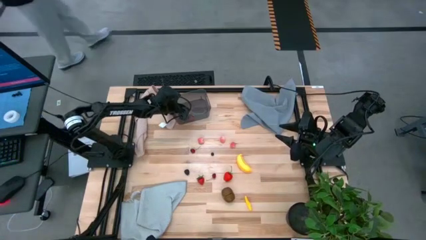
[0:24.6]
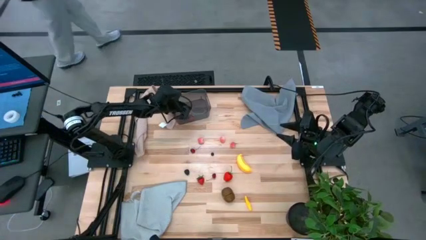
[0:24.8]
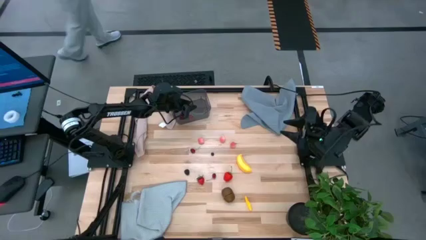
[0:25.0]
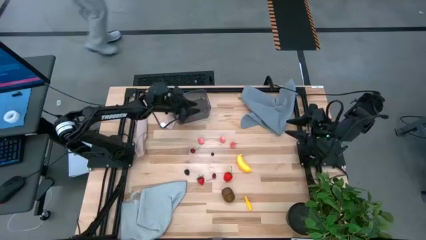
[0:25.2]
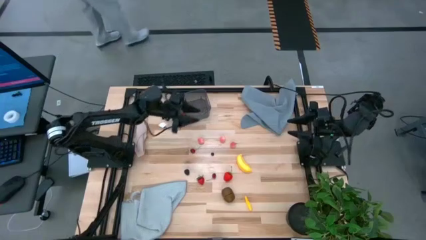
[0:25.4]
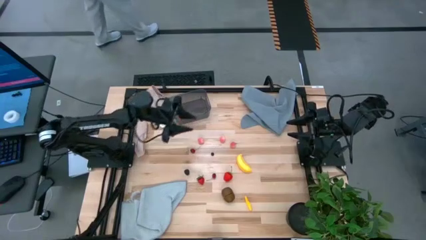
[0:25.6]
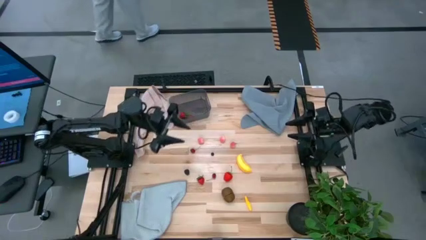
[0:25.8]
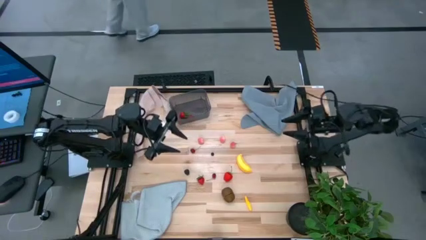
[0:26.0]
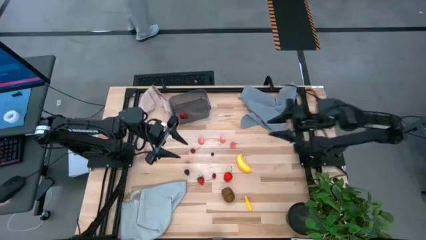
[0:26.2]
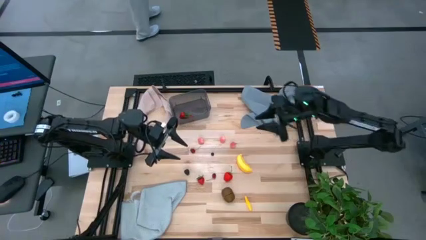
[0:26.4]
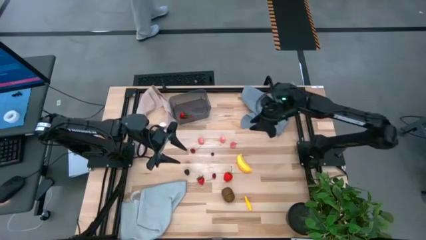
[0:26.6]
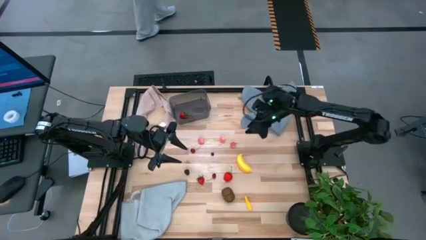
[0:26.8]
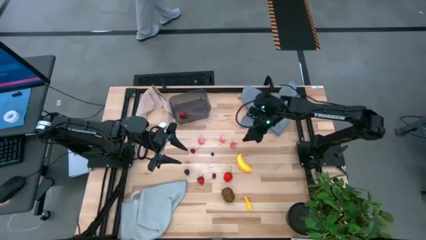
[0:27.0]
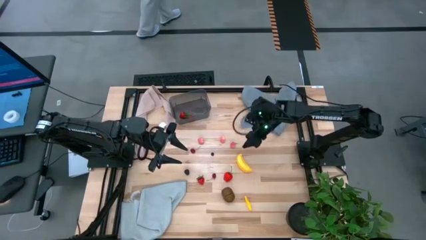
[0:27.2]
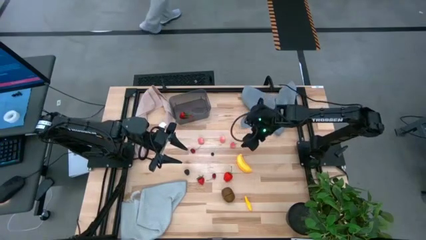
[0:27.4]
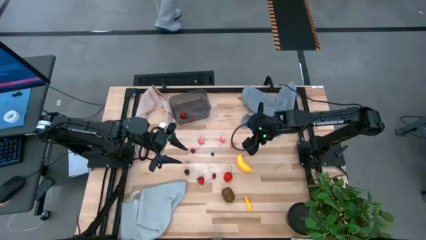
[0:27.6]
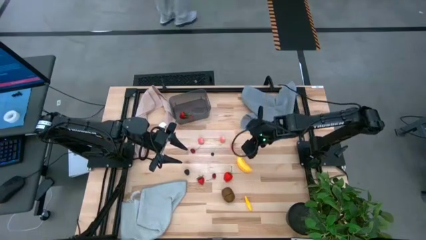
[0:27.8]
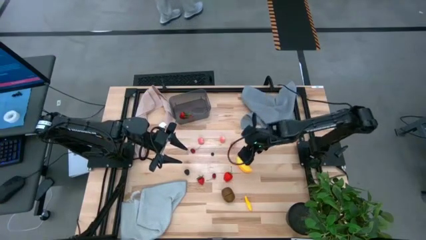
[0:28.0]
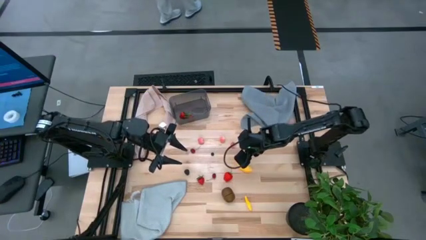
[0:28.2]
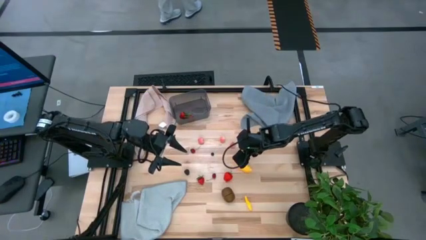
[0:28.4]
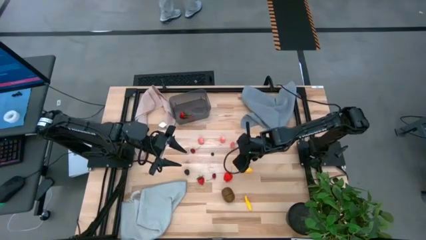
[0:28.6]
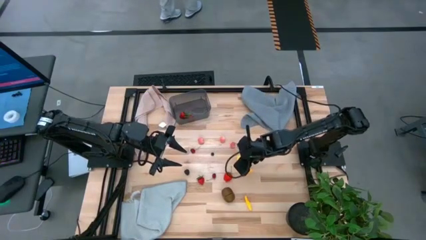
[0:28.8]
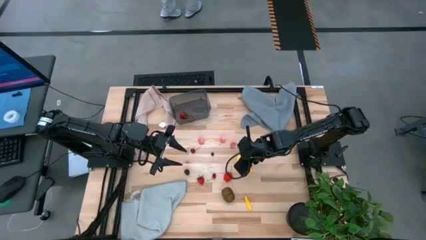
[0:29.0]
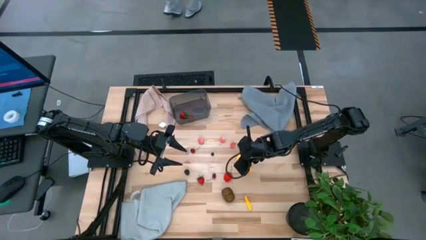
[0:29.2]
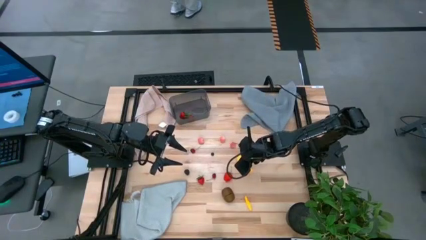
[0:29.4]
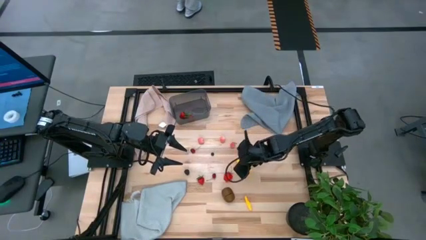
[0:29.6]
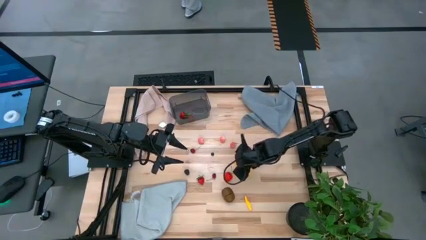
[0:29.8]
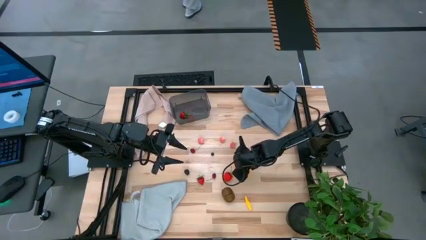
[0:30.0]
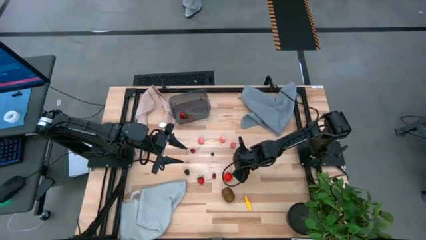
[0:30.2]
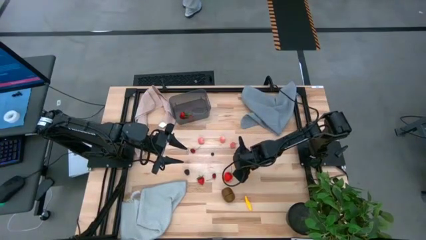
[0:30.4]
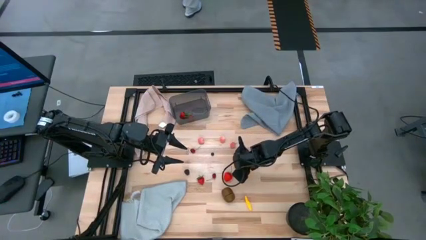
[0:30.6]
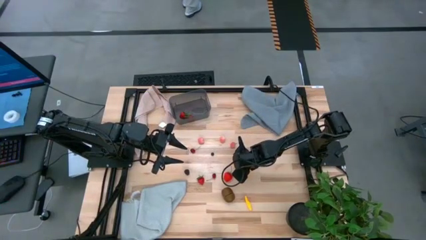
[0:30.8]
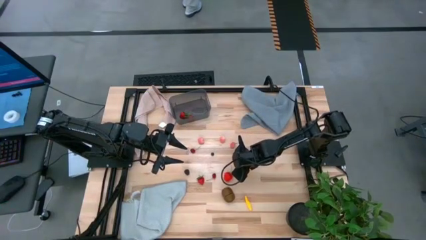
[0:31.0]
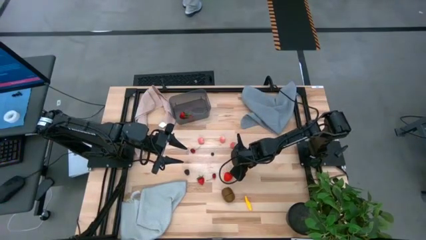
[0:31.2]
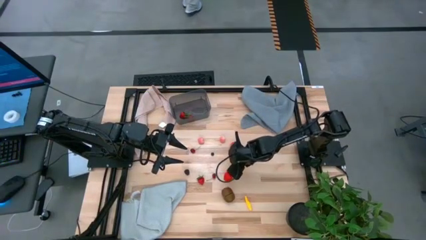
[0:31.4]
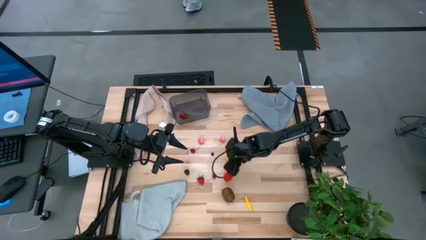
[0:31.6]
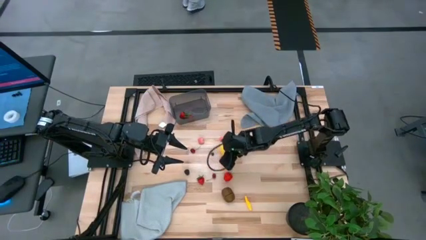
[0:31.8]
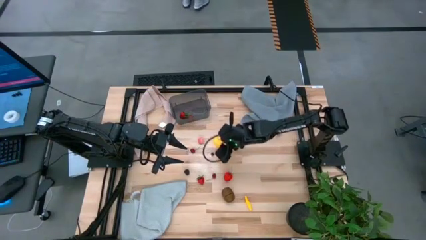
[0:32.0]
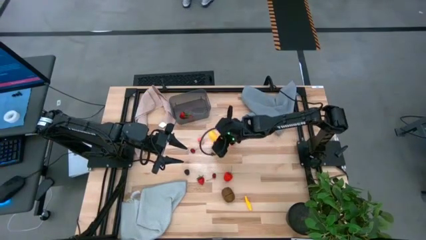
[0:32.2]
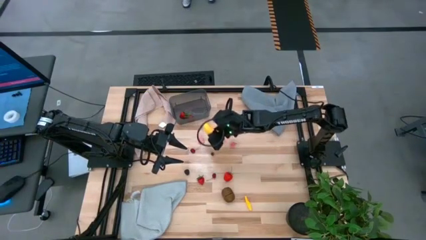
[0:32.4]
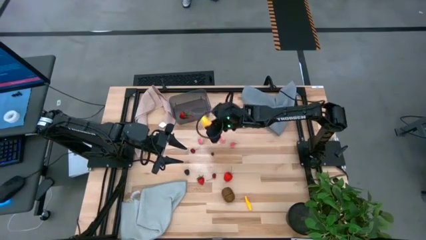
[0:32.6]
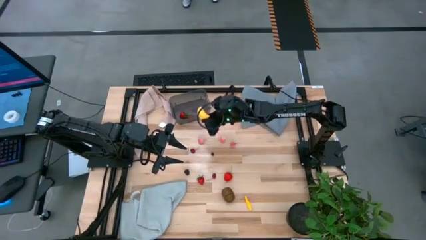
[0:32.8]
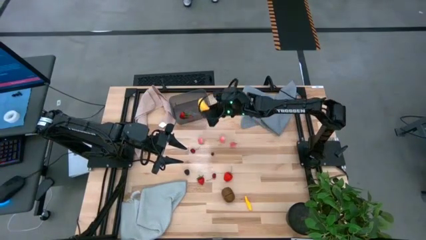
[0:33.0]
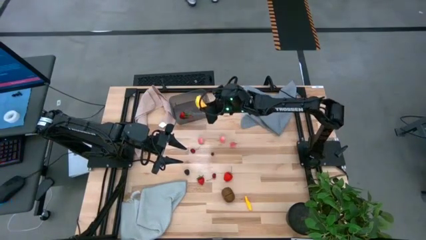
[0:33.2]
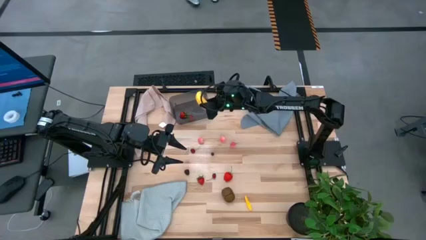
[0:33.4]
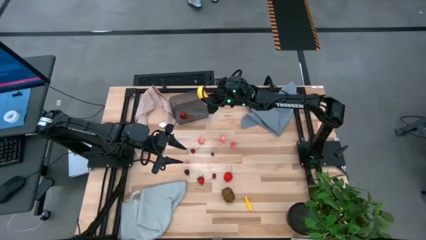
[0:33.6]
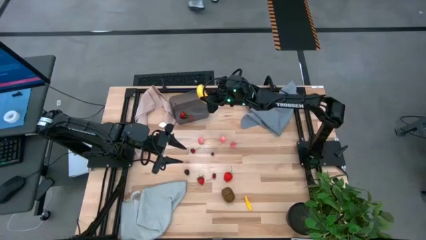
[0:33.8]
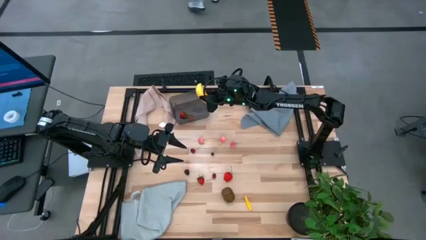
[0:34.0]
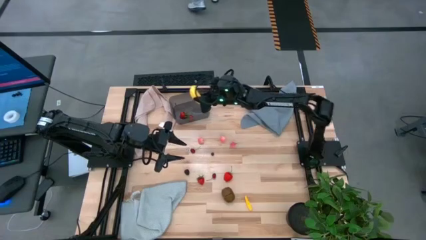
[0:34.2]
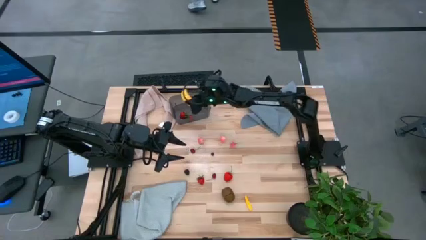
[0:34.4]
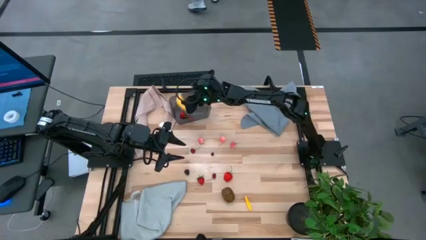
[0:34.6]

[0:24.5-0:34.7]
Task: Pick and placing Produce into tupperware
Put the yellow banana into the black bin

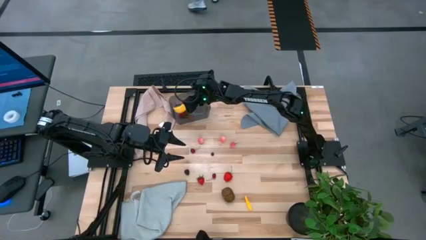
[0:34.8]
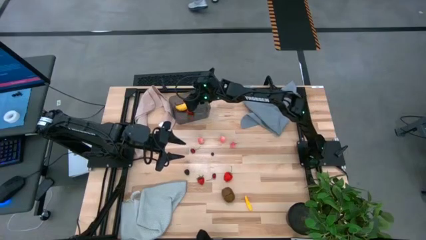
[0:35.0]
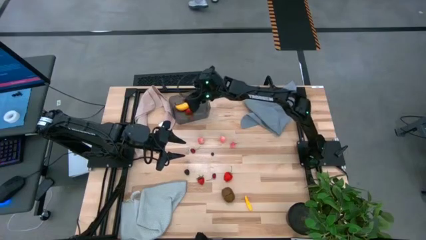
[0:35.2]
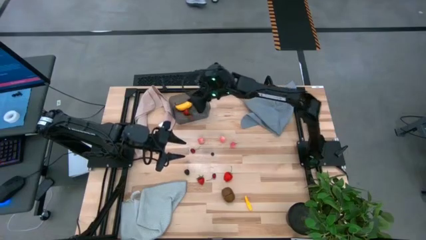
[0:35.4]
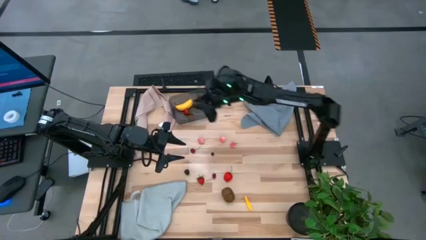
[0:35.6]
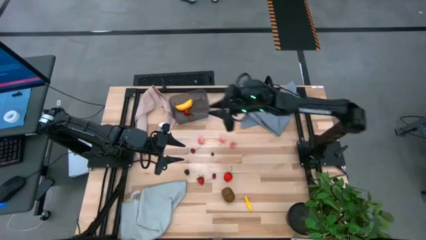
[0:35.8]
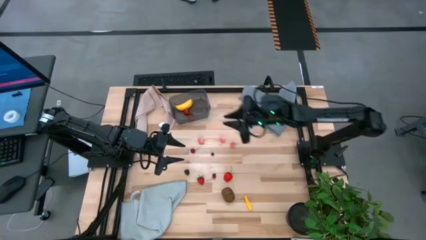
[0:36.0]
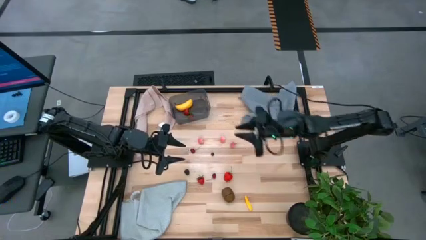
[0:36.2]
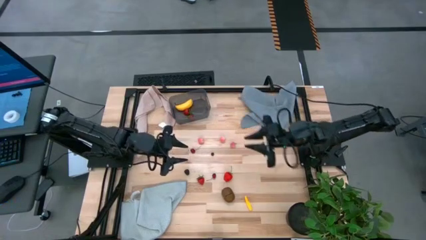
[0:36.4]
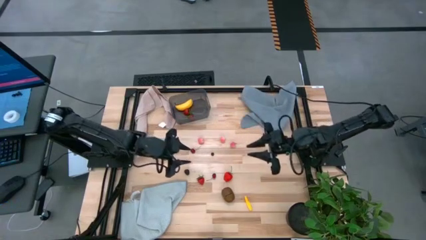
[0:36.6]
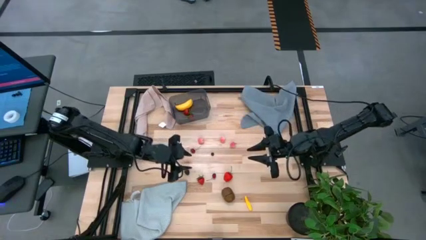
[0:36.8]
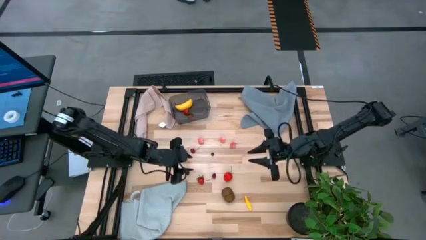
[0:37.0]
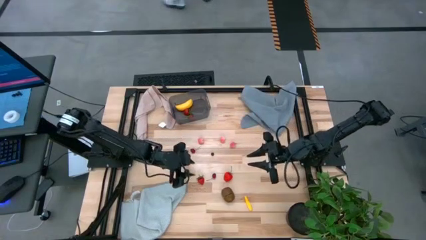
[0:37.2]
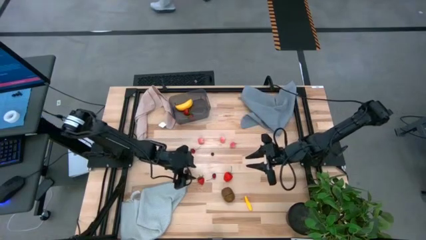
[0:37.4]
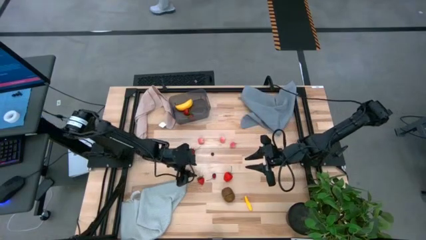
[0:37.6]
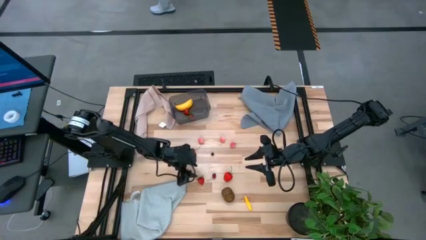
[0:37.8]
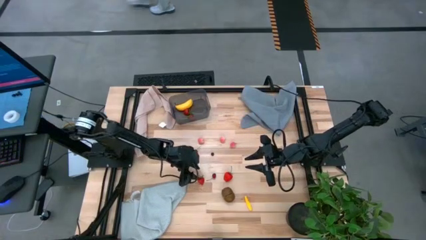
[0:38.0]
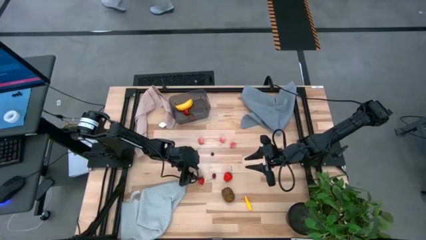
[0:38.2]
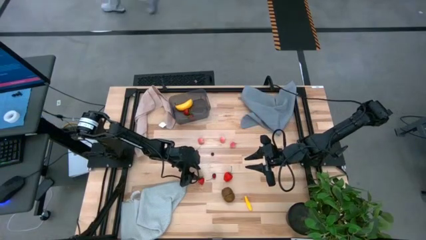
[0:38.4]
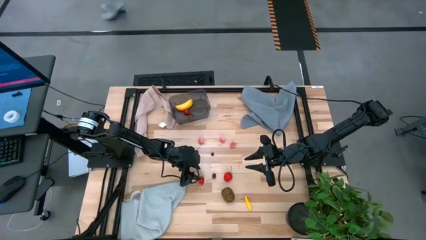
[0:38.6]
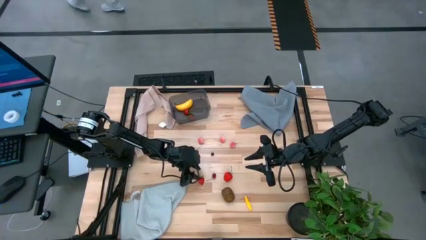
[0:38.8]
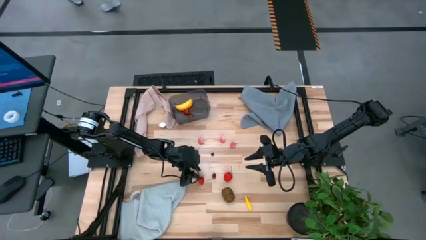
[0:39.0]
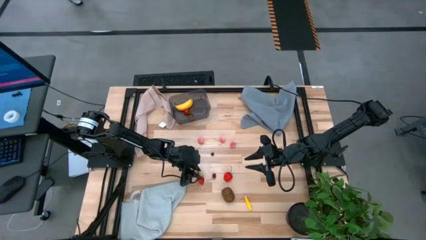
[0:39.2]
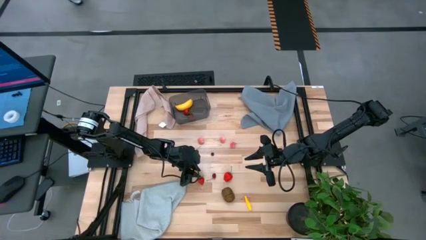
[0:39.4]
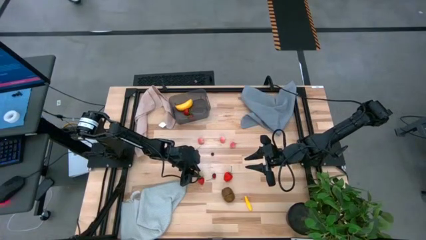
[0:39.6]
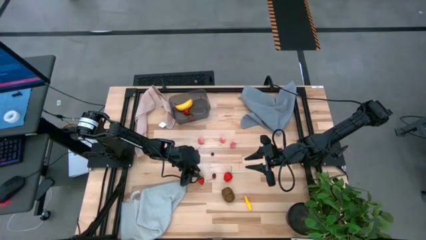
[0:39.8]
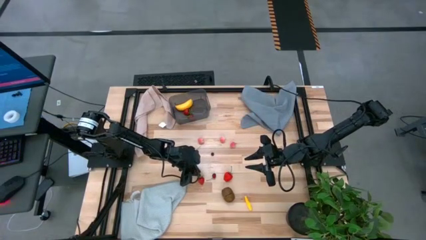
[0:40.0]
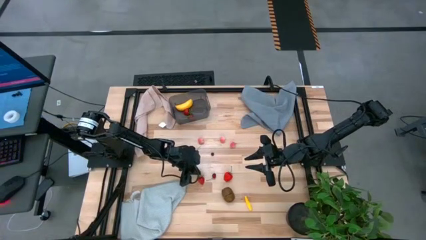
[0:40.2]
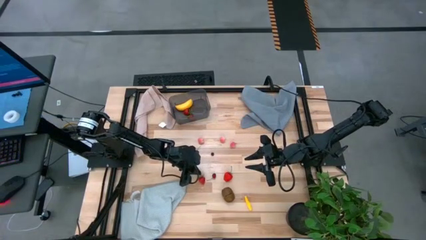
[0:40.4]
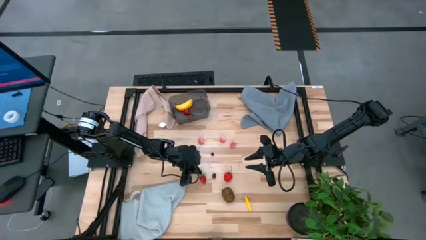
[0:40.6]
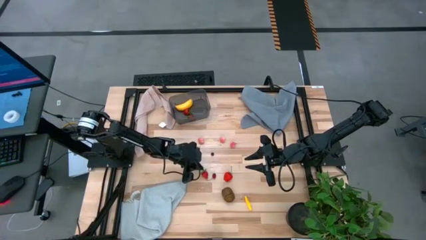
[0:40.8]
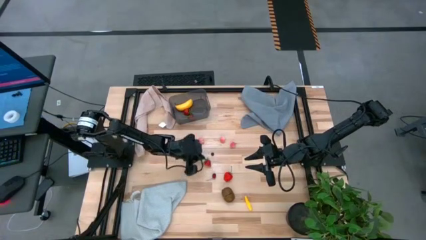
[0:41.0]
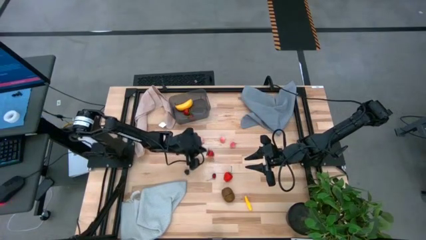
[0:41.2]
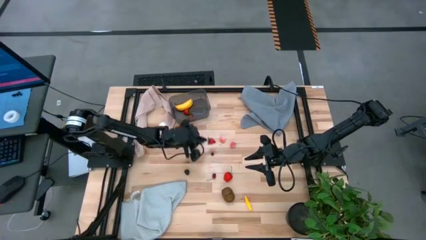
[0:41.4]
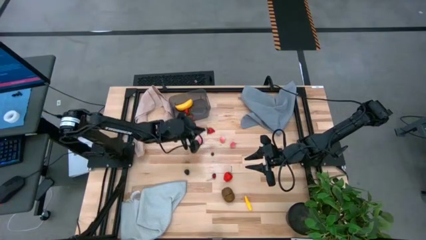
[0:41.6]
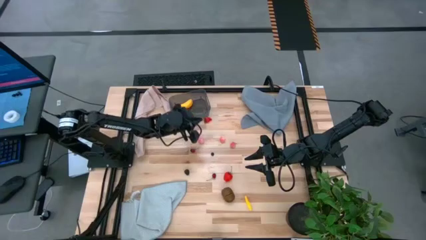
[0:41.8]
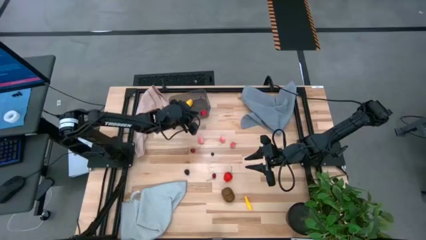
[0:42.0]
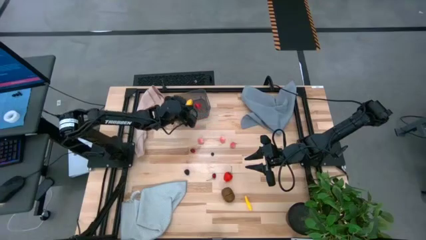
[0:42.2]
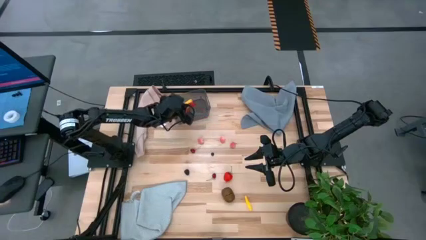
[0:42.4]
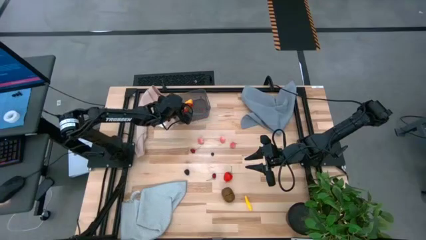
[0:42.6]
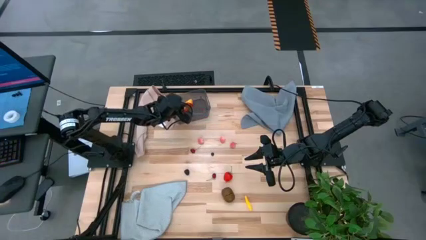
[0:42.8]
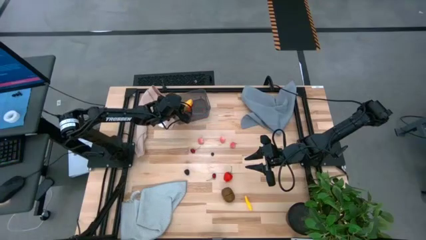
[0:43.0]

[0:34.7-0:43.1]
Put the red strawberry into the black bin
